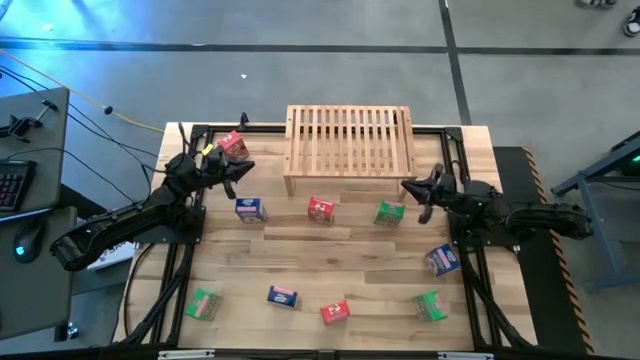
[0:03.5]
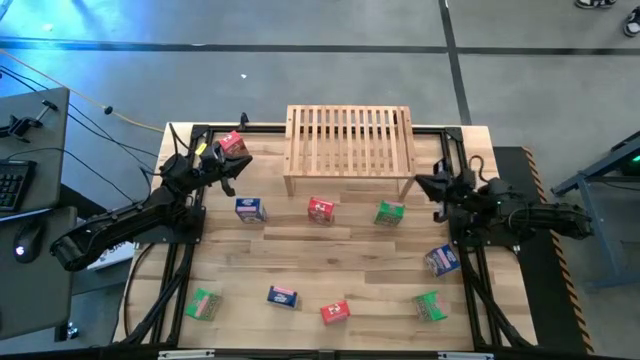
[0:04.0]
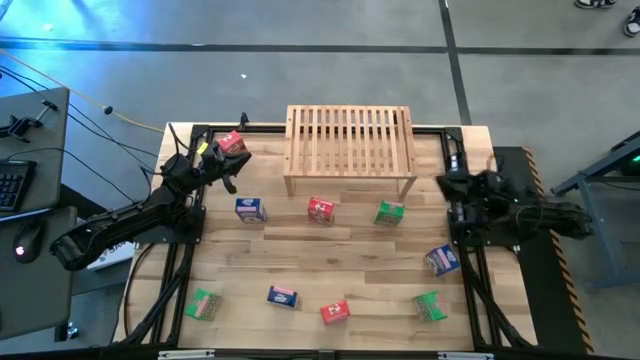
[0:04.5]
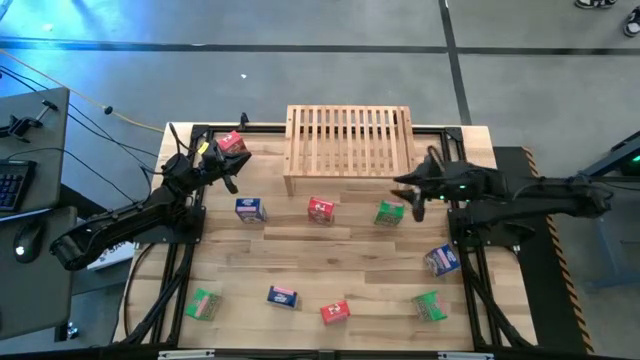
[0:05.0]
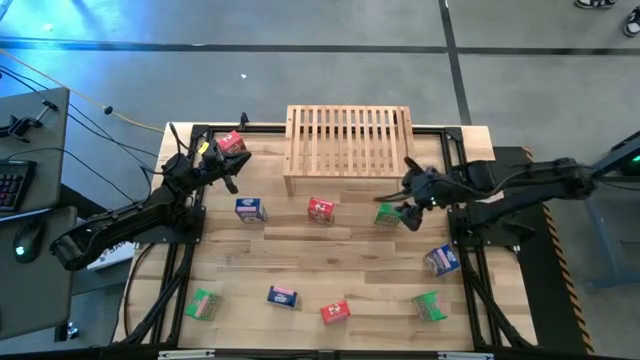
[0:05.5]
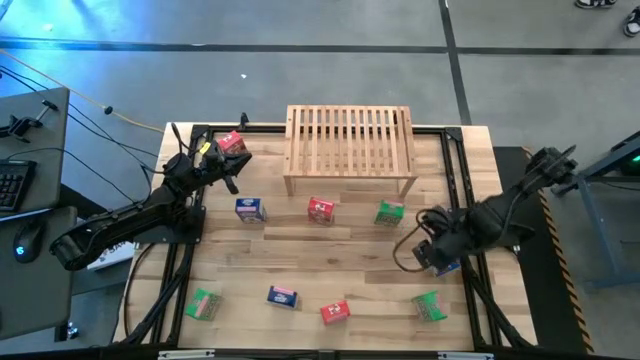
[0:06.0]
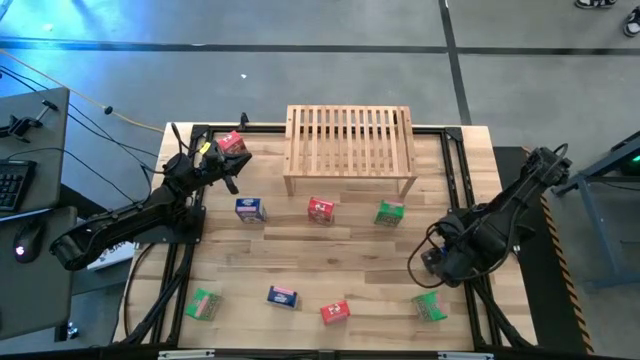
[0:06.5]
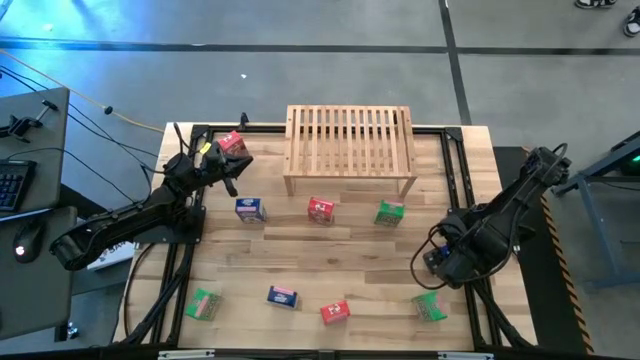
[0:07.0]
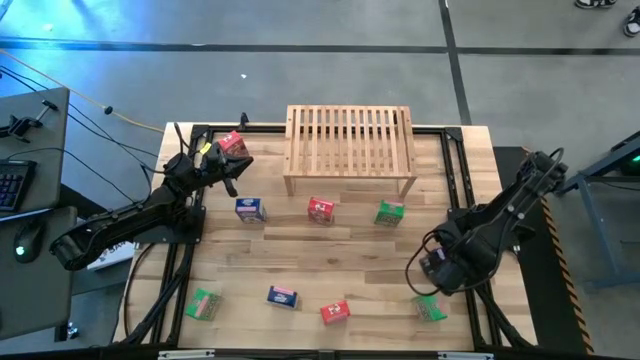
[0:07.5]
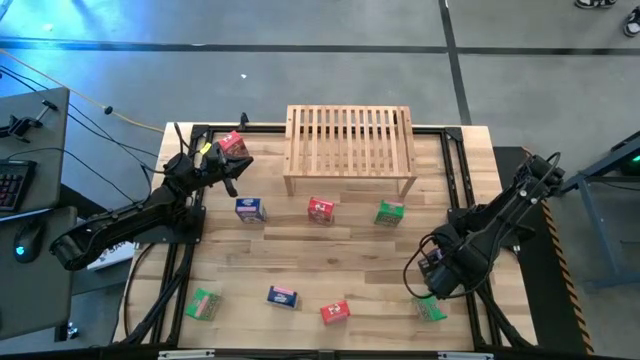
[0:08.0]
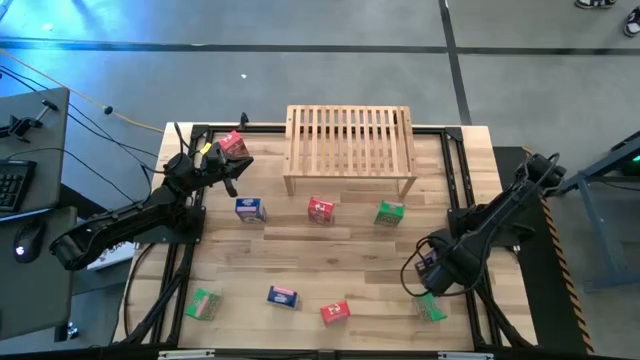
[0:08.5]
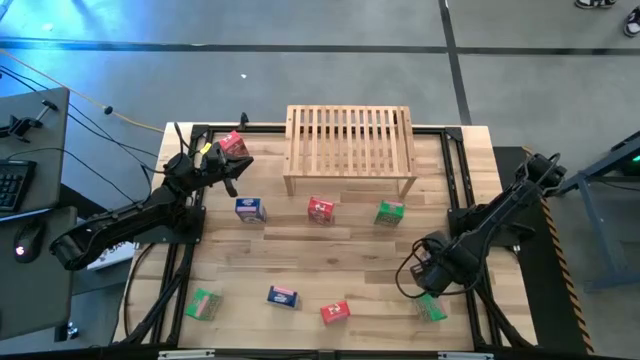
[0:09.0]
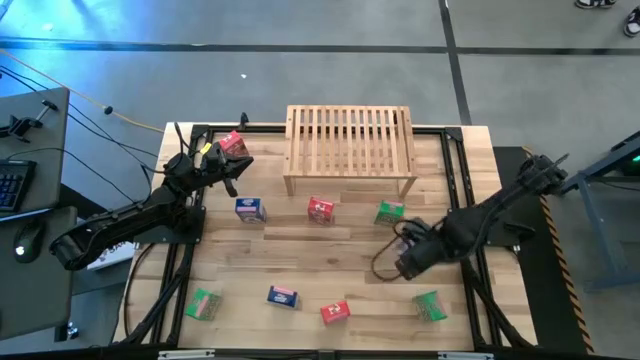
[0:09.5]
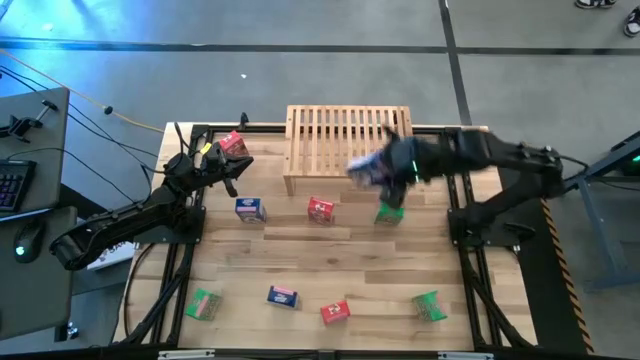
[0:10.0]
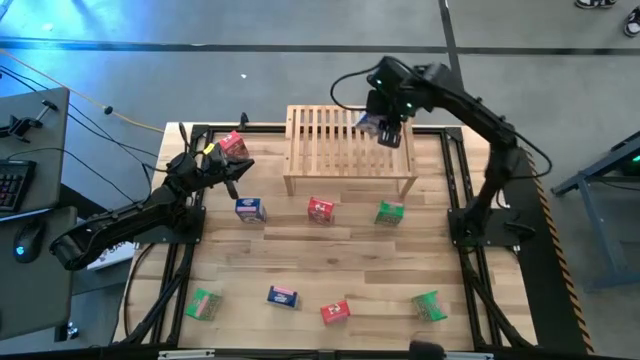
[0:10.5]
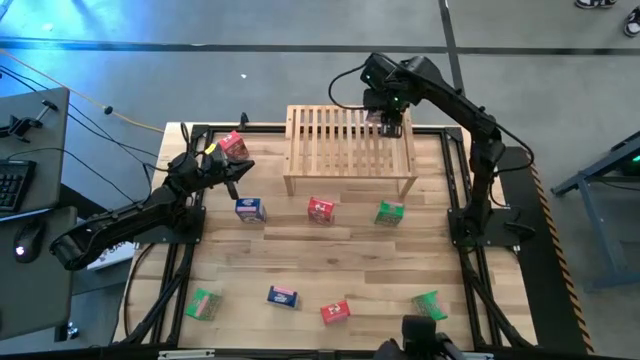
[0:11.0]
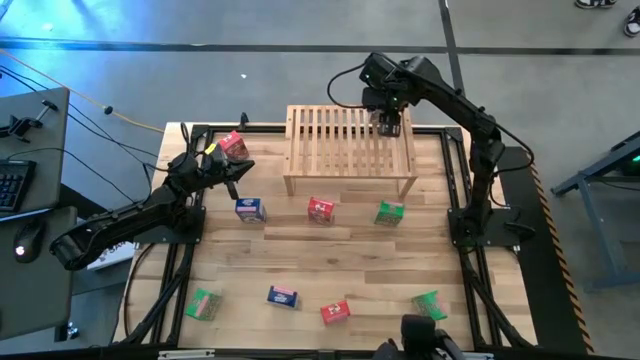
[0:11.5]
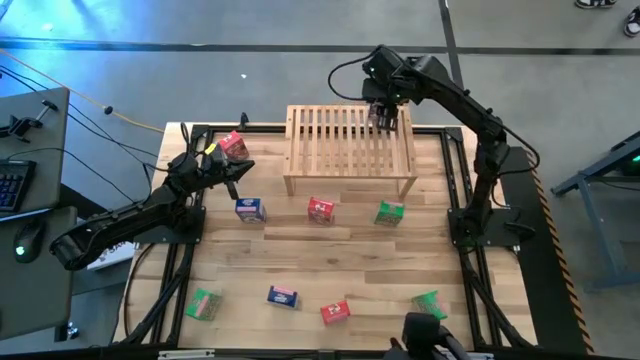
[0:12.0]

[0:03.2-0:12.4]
Task: Stack cereal on shelf
Put the middle right blue cereal box on the shelf

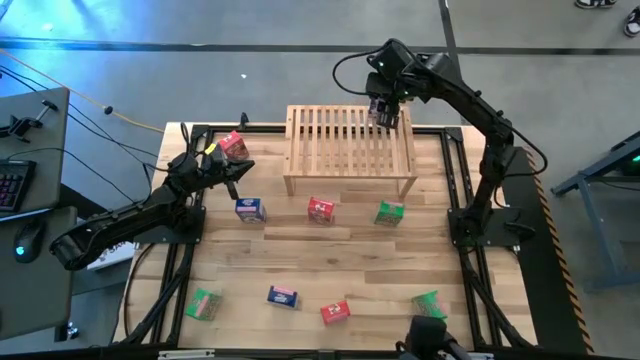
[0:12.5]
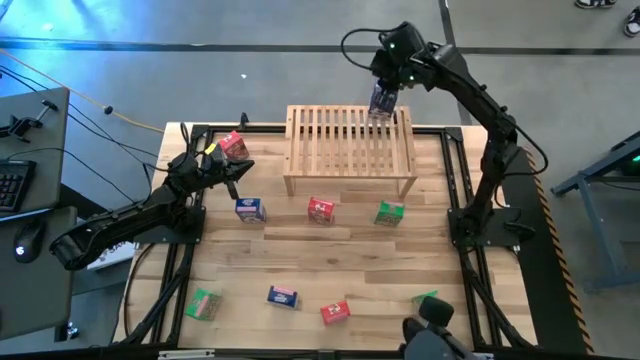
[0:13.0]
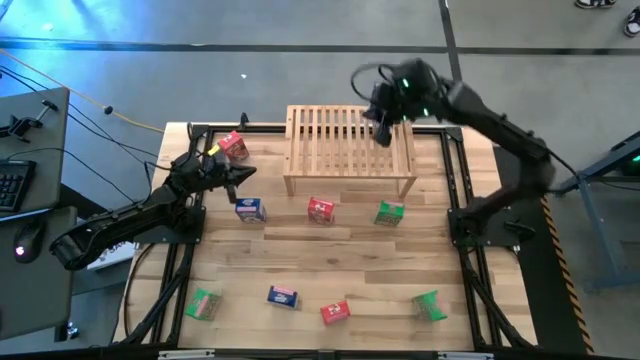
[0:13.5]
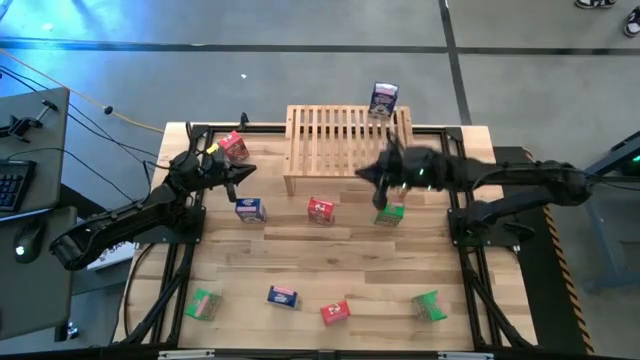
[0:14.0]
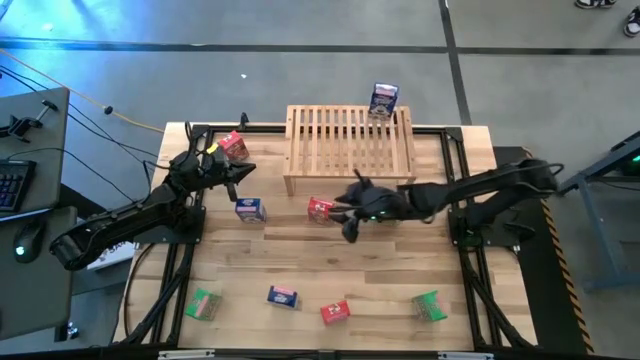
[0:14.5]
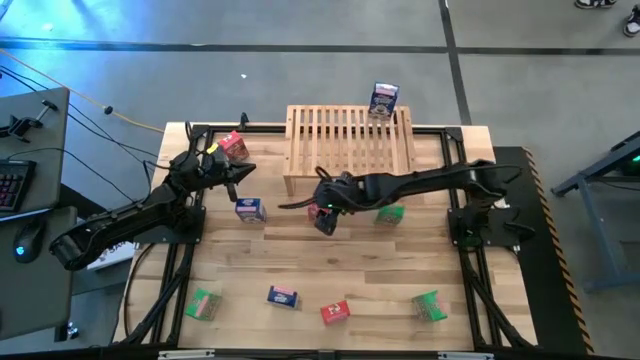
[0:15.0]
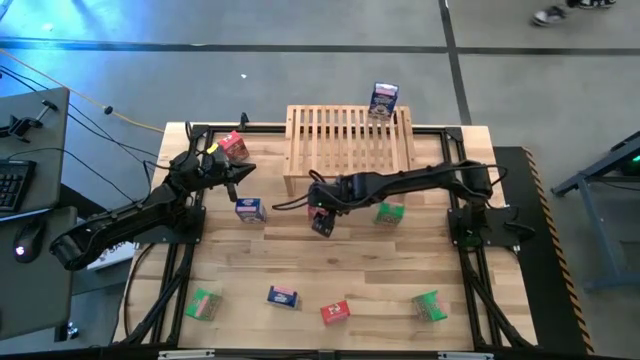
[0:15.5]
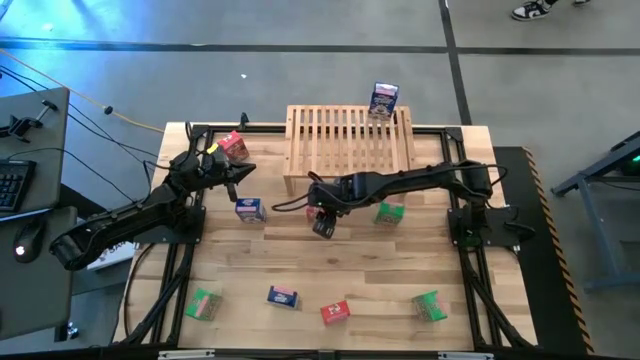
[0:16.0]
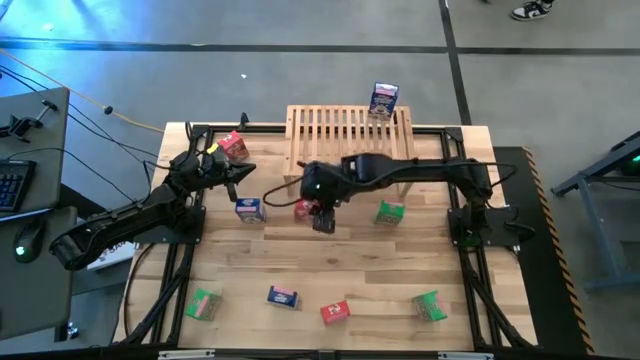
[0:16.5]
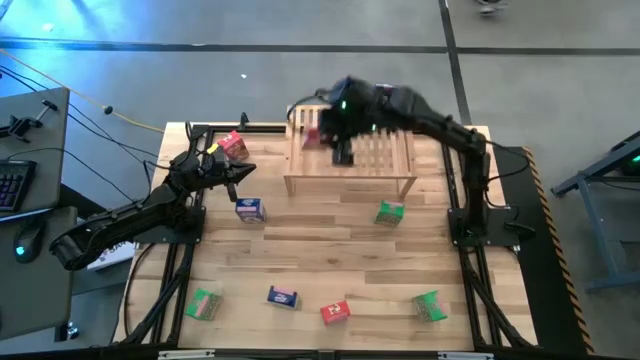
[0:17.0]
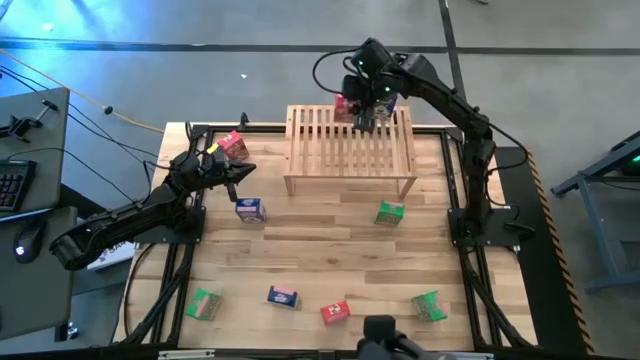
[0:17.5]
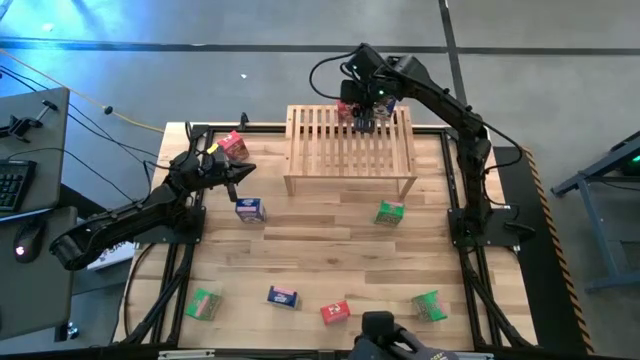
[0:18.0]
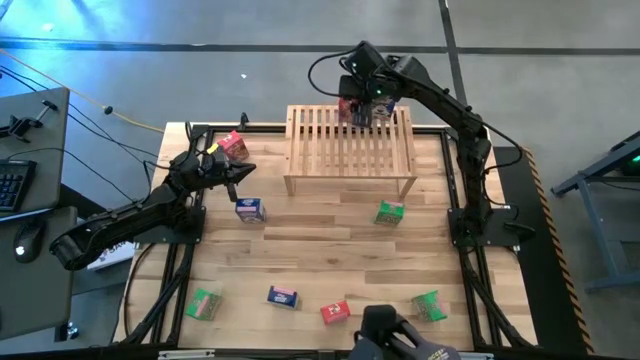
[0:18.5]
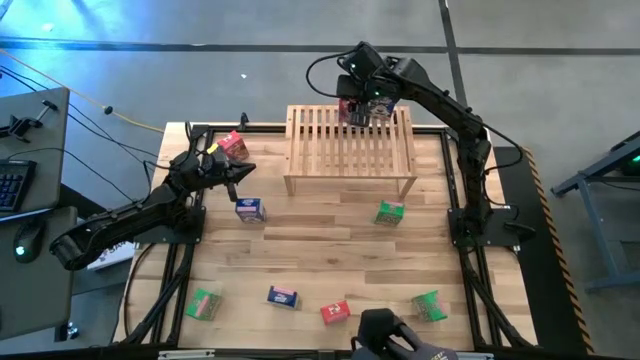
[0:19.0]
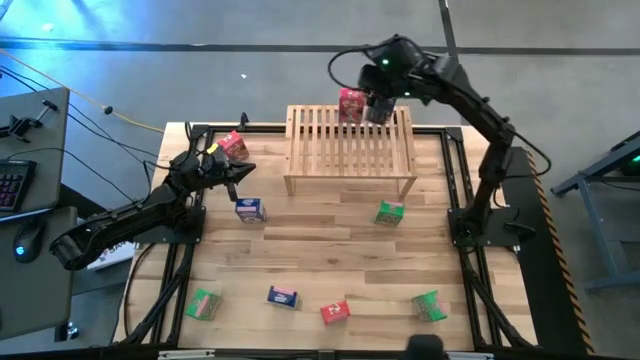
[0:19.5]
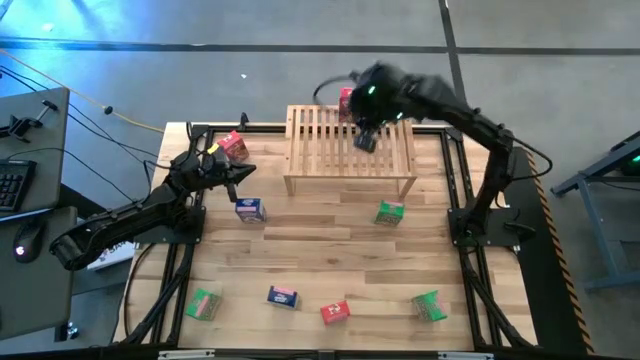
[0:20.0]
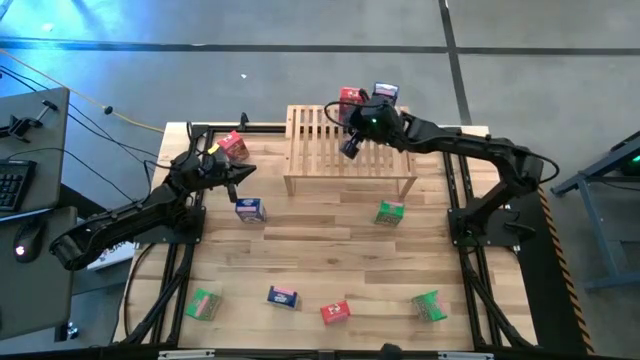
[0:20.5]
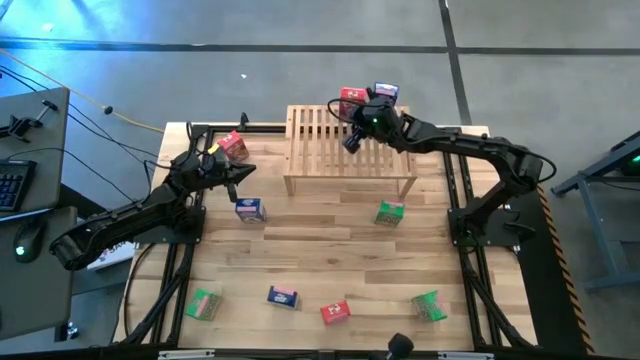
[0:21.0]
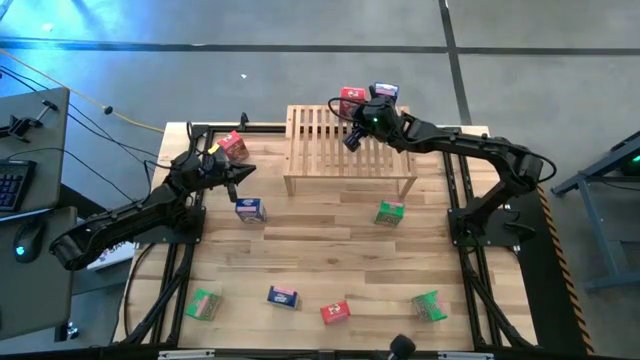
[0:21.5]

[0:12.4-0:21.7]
Put the middle red cereal box on the shelf

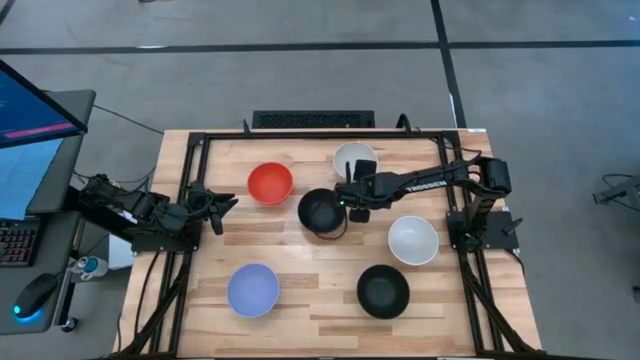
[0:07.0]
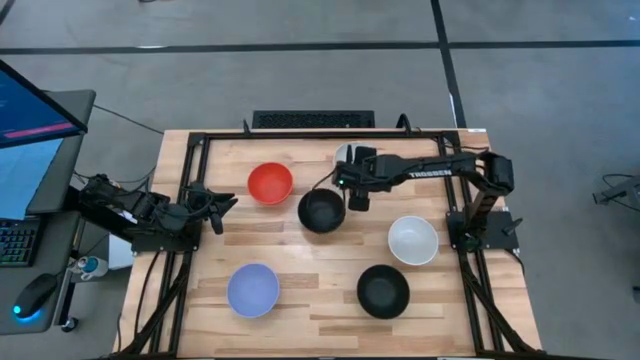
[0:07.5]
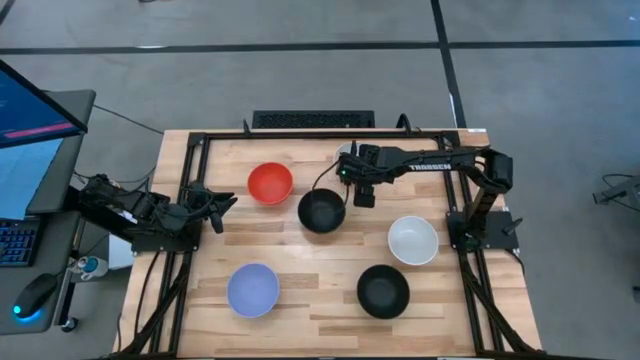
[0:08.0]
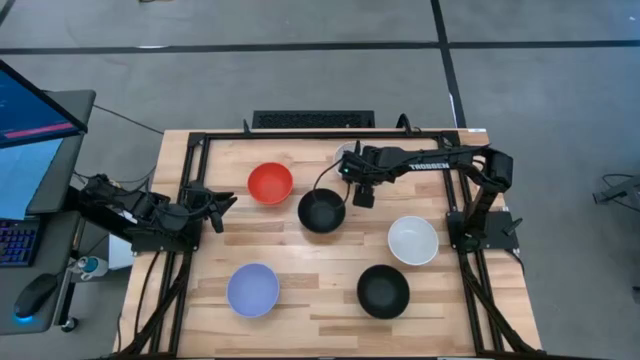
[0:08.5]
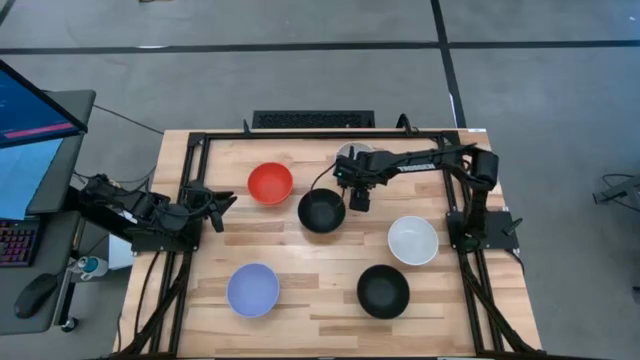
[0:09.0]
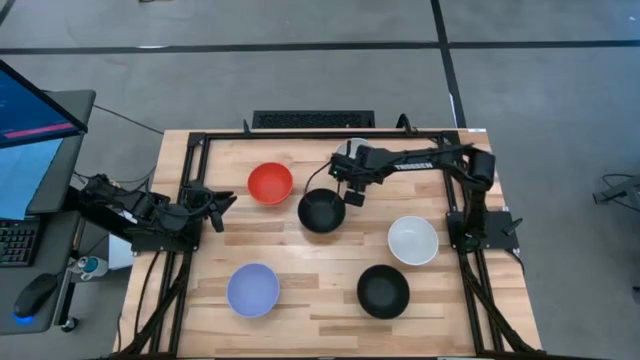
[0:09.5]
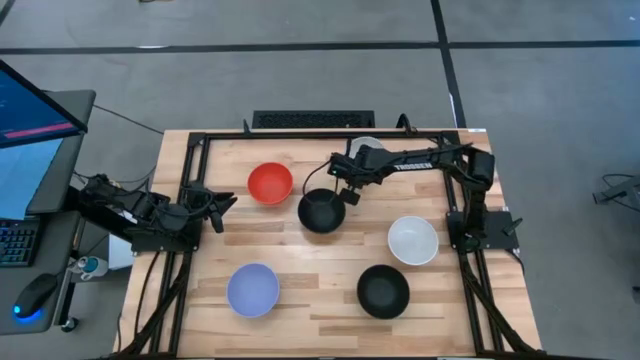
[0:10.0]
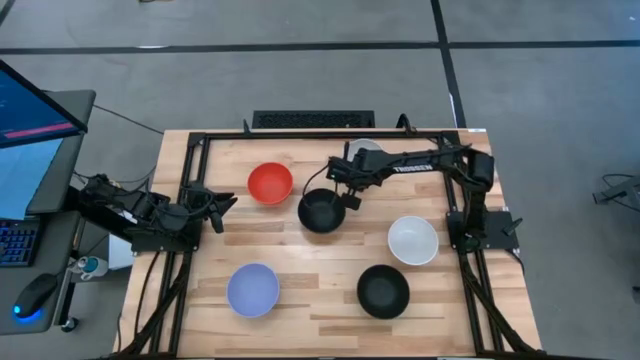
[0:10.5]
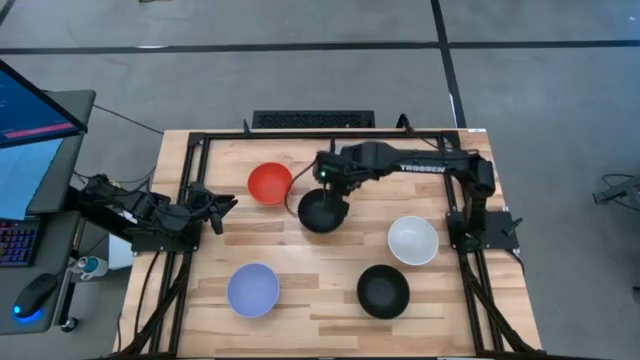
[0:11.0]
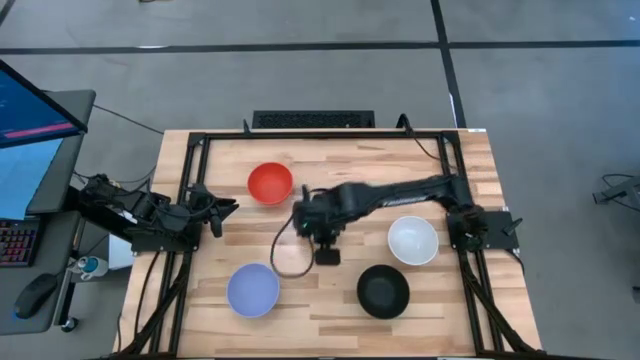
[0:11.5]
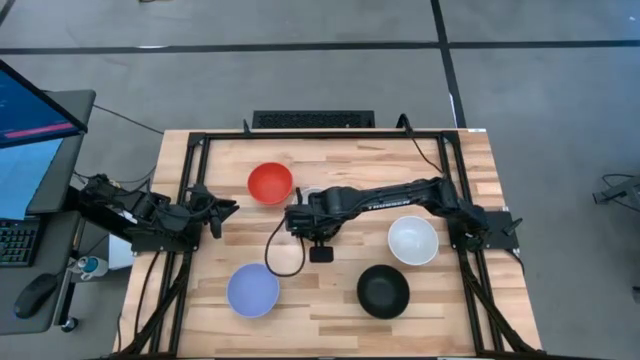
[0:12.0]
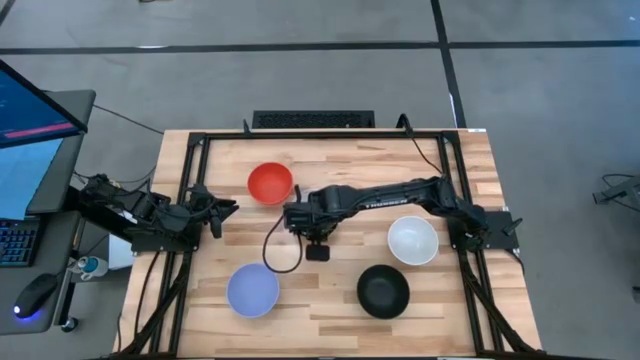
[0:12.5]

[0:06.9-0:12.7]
Task: Nest bowls inside each other
Stack the top white bowl on the top black bowl
